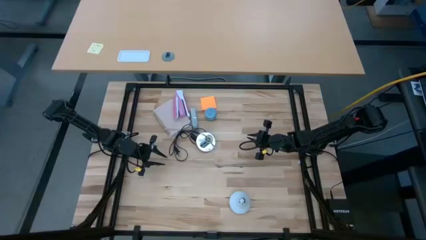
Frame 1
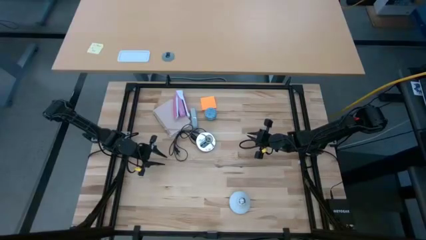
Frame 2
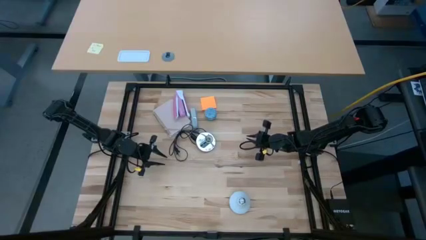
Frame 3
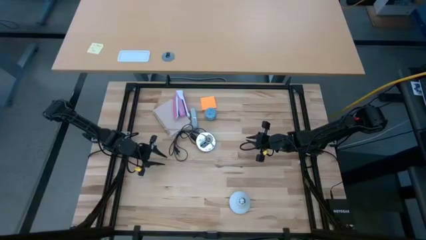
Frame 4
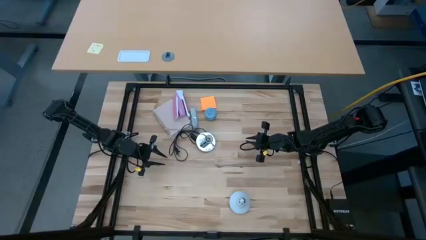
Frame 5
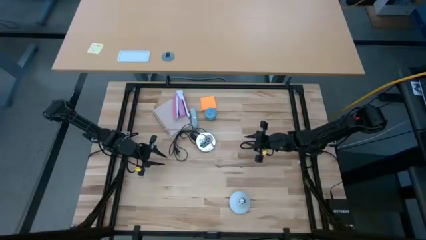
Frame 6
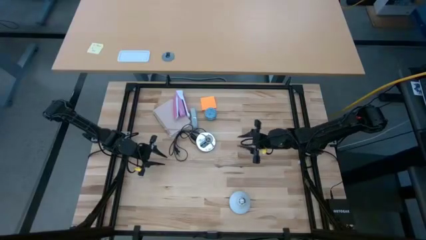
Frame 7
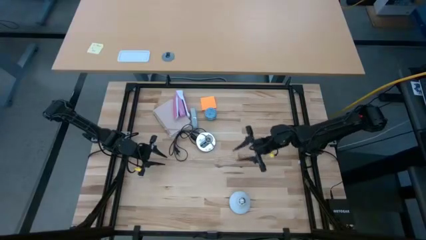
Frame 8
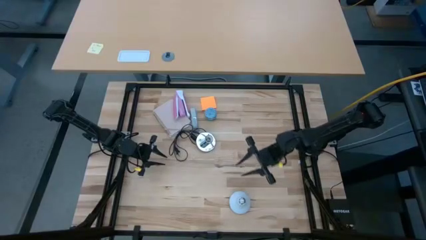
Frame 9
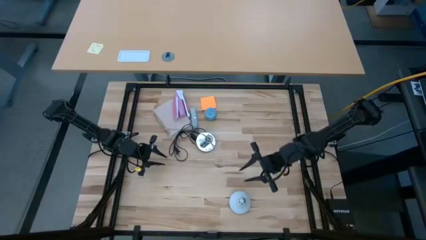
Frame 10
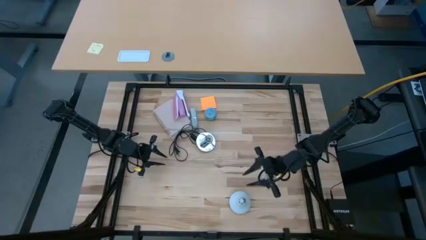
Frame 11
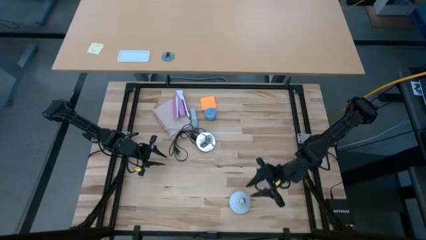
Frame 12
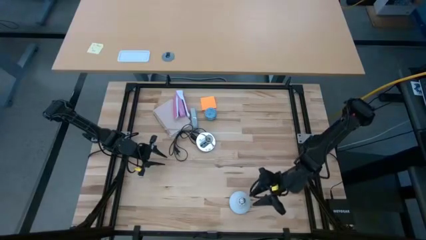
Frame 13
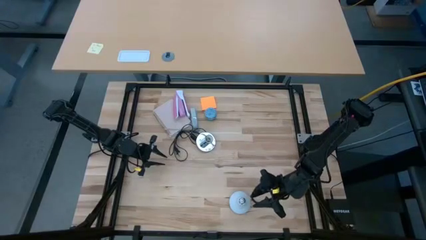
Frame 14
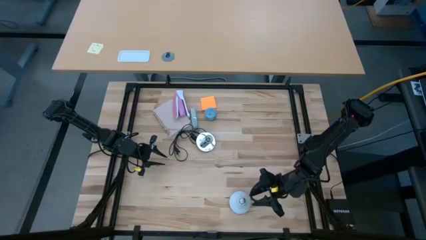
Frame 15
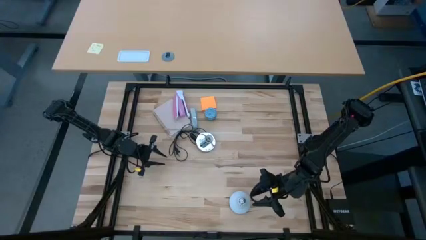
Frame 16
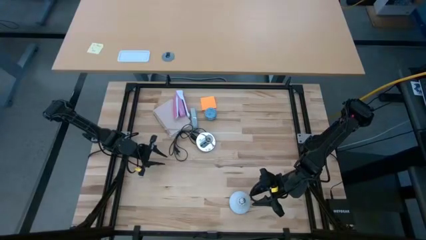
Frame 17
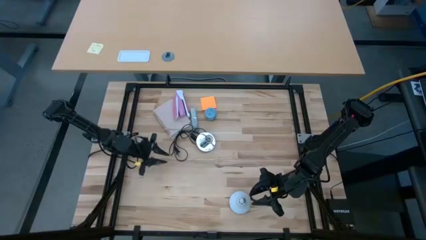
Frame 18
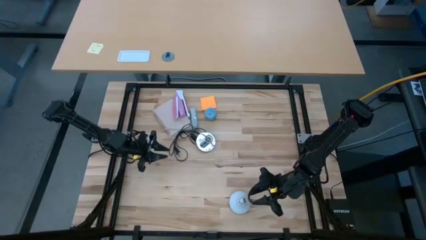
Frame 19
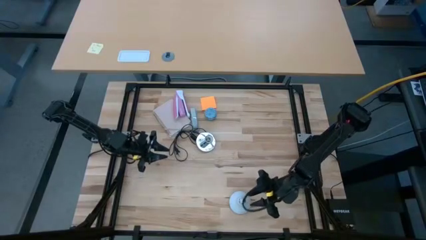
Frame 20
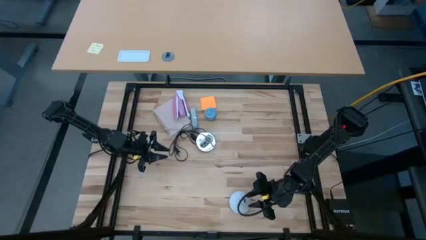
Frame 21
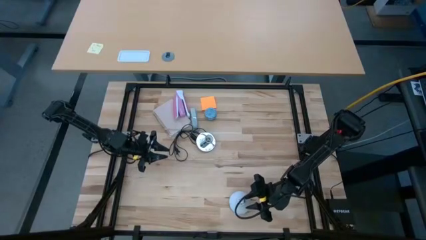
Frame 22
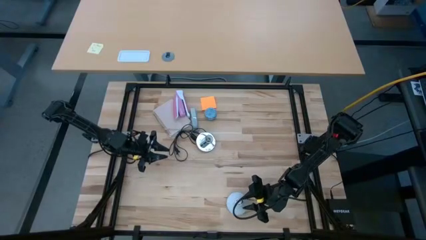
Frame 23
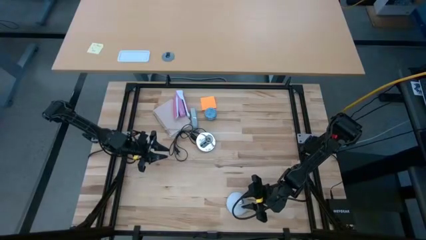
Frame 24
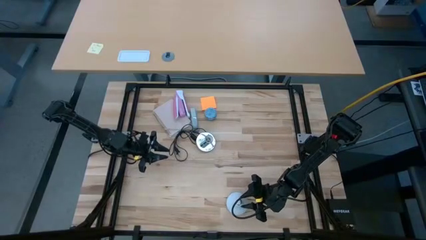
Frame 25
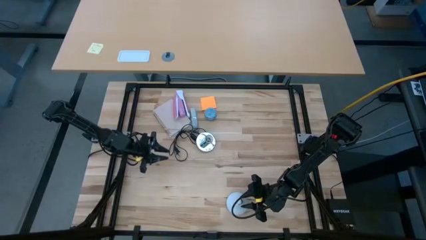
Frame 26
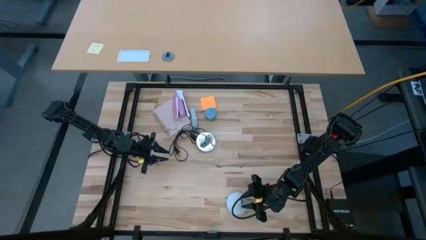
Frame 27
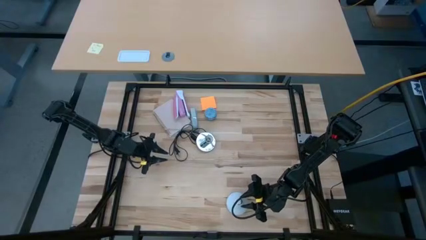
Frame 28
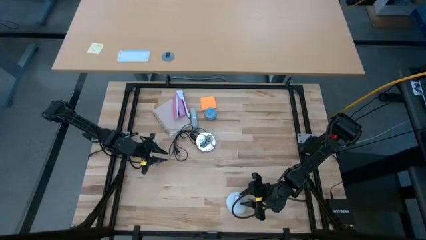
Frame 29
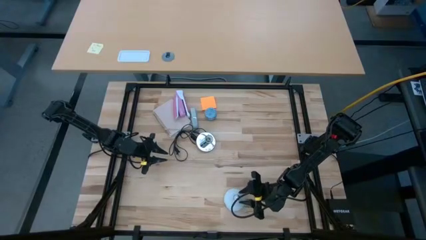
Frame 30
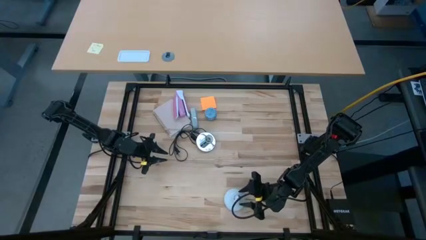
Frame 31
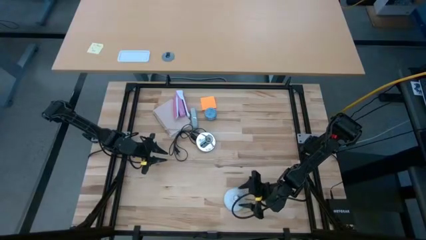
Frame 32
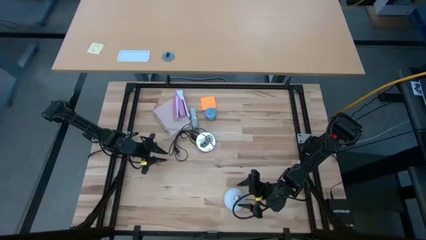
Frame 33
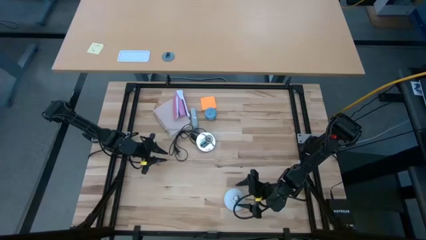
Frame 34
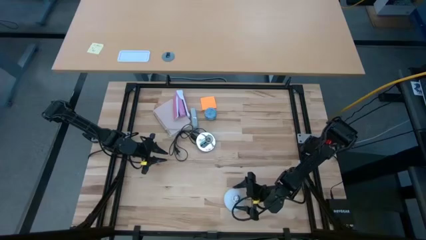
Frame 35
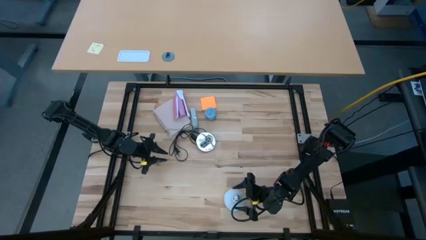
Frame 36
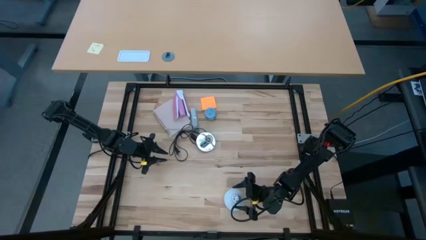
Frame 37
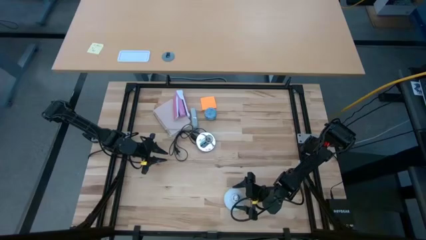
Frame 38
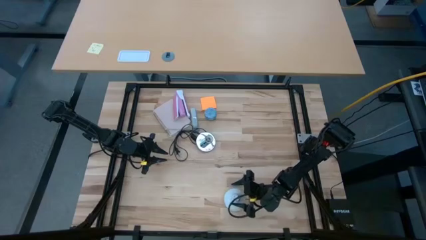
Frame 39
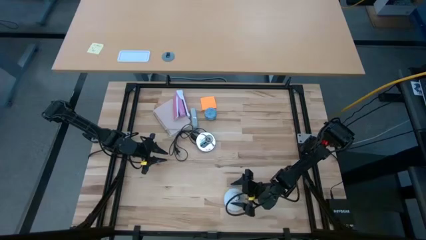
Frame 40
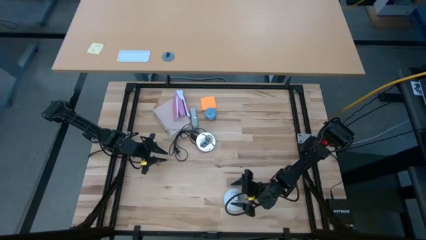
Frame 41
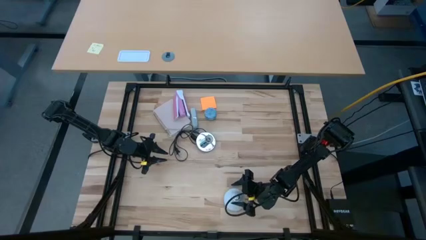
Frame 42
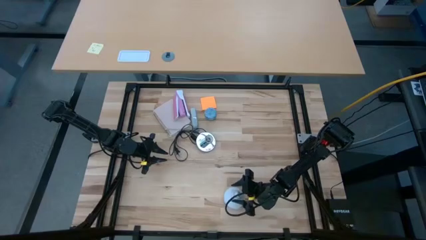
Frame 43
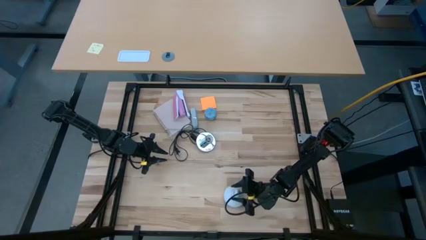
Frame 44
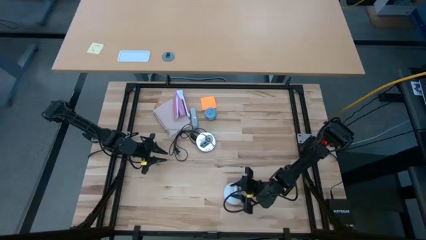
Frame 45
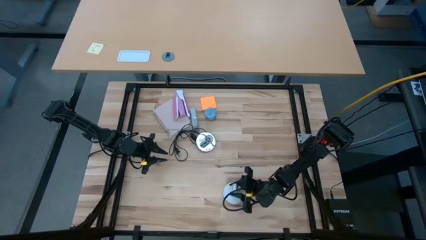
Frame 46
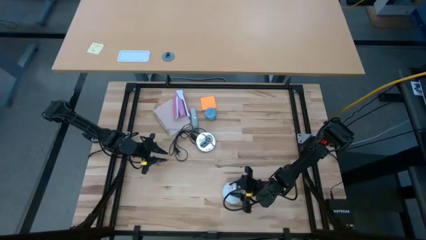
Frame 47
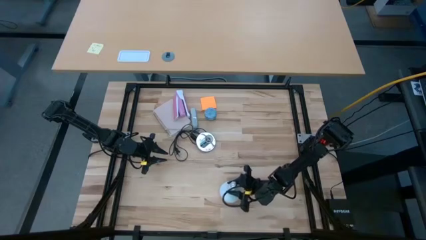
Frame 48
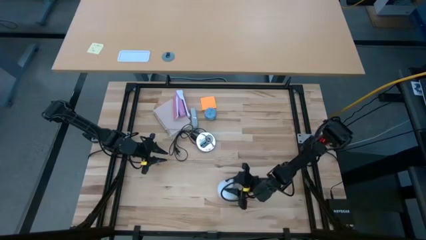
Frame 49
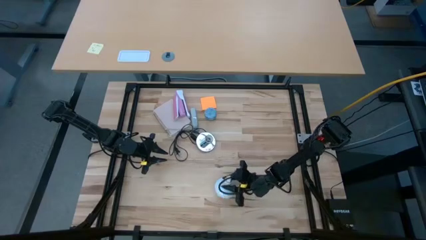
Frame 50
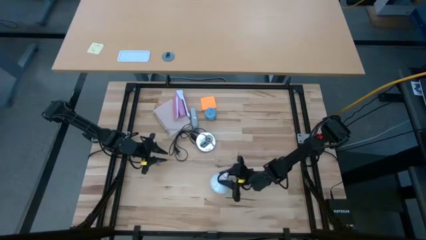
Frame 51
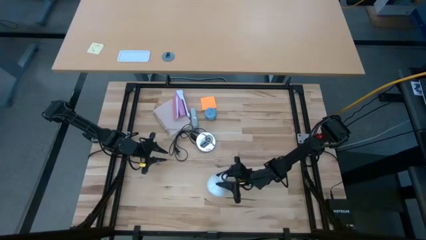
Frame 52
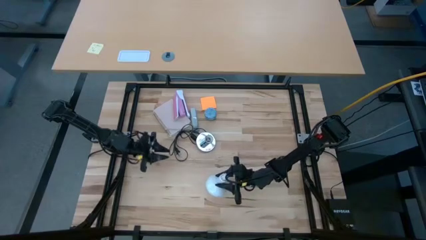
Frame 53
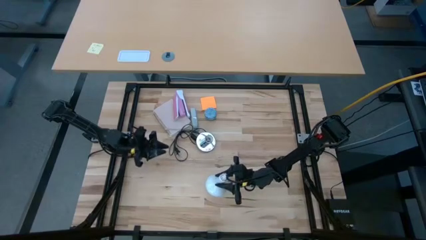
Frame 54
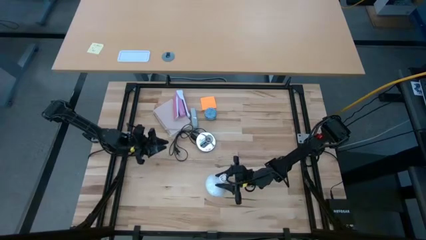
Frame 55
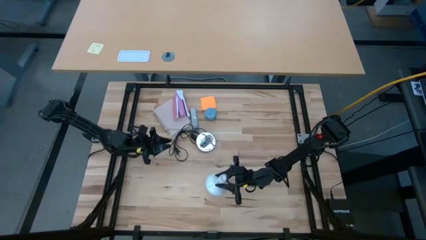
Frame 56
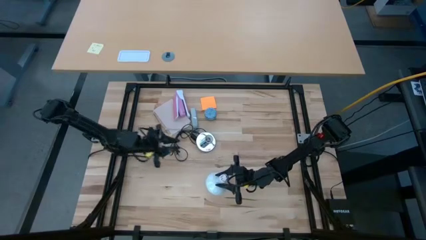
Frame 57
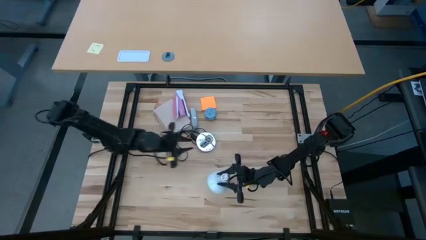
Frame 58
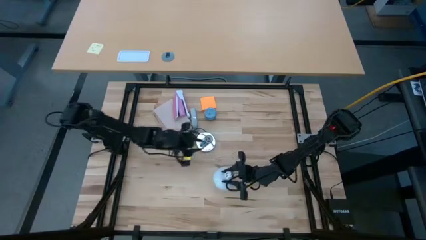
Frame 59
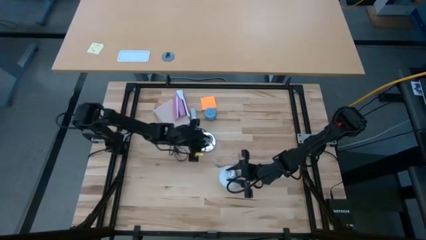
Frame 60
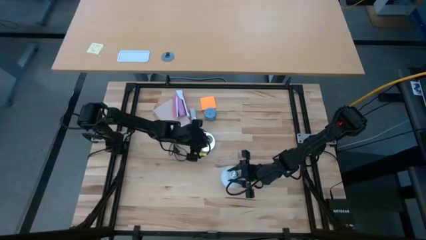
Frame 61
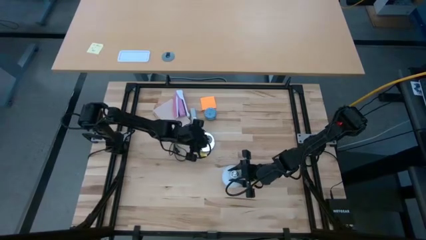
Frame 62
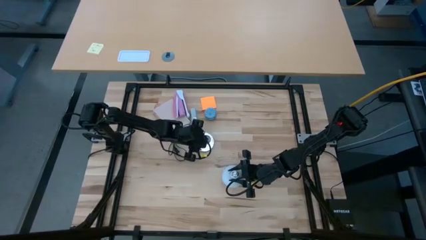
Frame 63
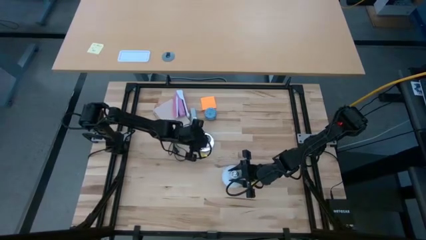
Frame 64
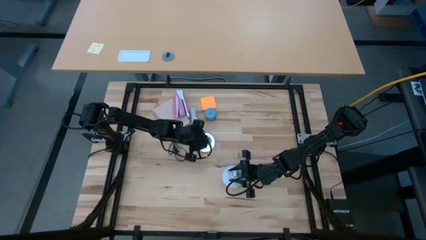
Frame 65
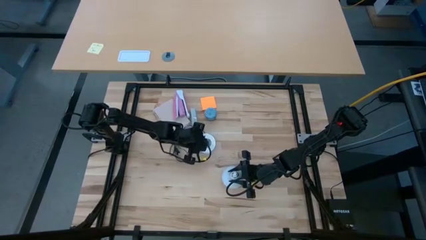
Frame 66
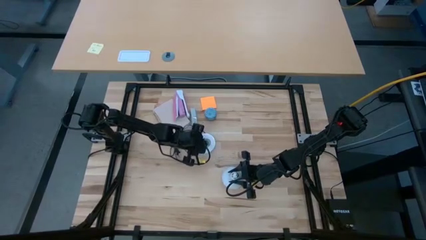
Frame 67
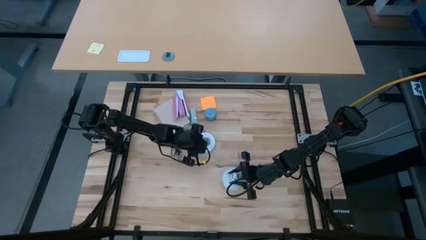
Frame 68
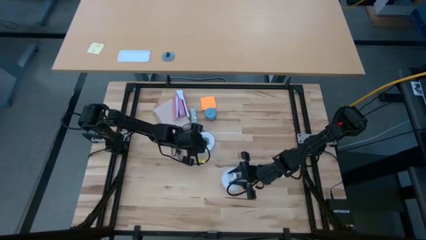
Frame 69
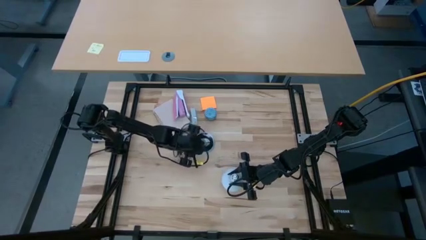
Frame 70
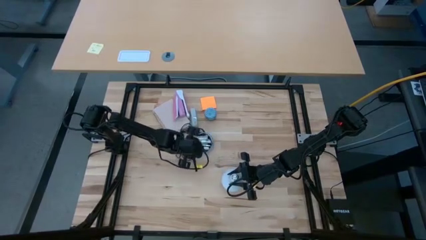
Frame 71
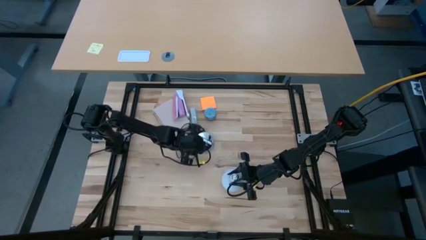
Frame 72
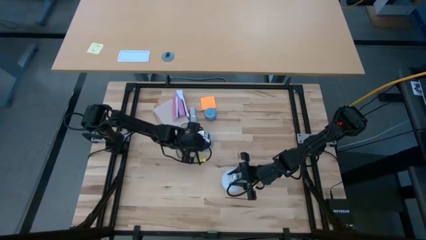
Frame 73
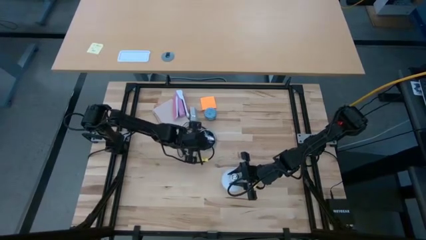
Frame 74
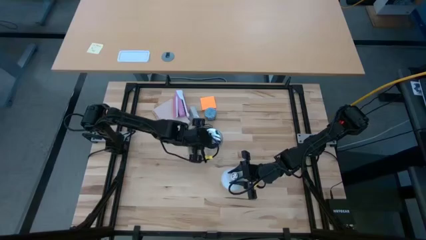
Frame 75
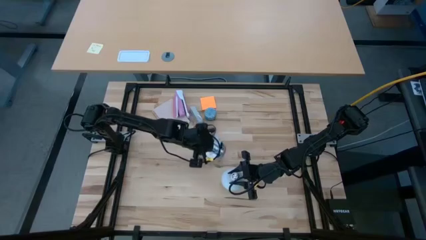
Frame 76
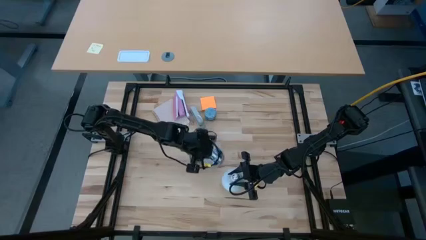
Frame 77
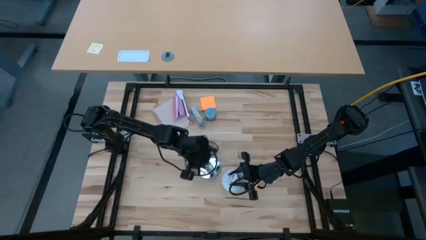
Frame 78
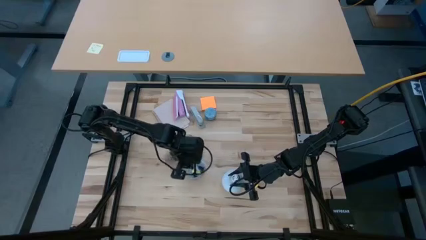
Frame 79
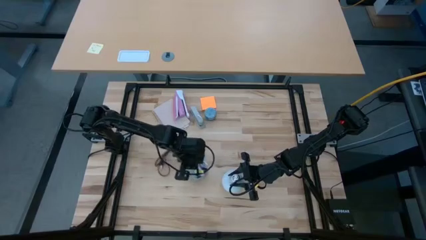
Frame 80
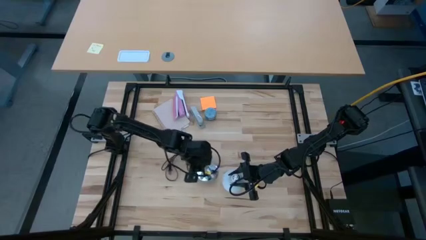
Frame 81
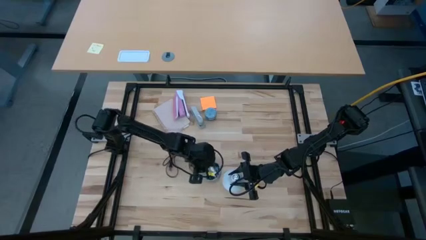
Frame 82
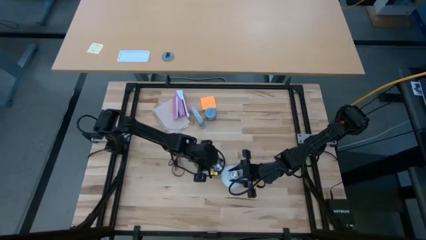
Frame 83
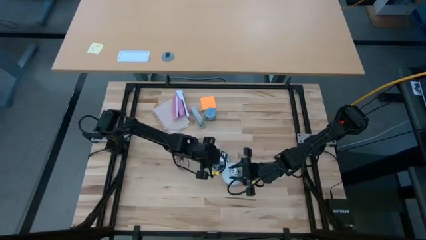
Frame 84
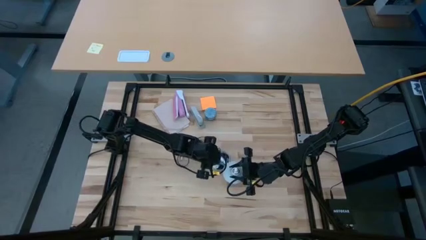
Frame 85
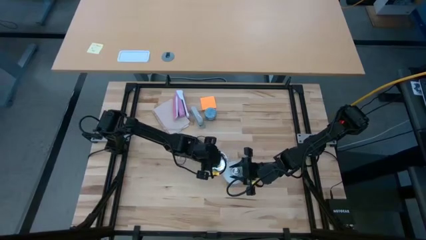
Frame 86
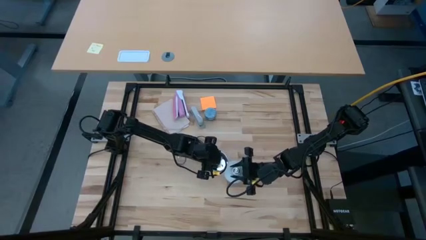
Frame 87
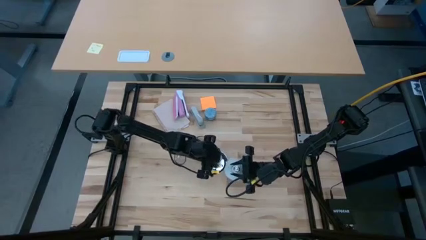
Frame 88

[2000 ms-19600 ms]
Task: Screw lightbulb
Insert the white lightbulb into the silver lamp
